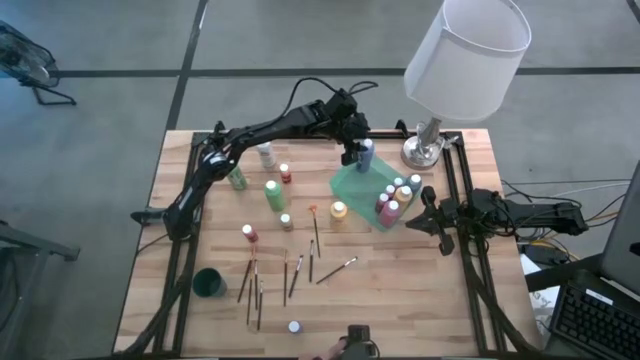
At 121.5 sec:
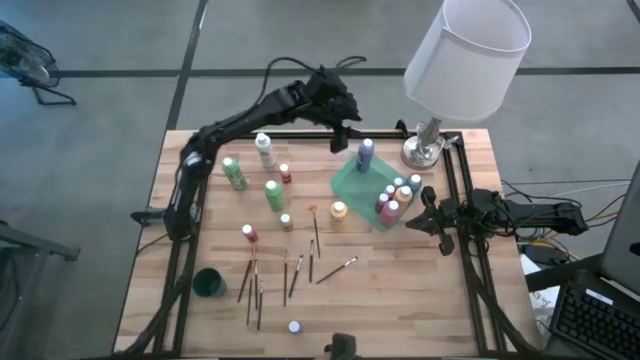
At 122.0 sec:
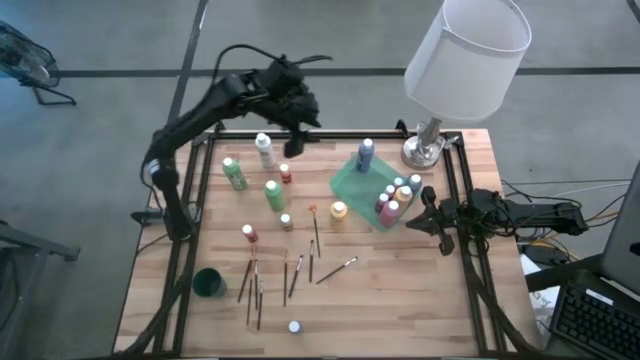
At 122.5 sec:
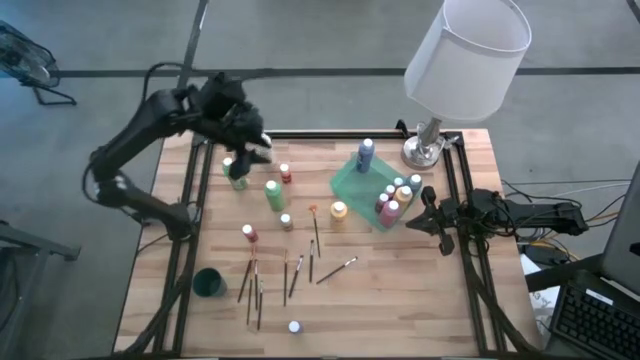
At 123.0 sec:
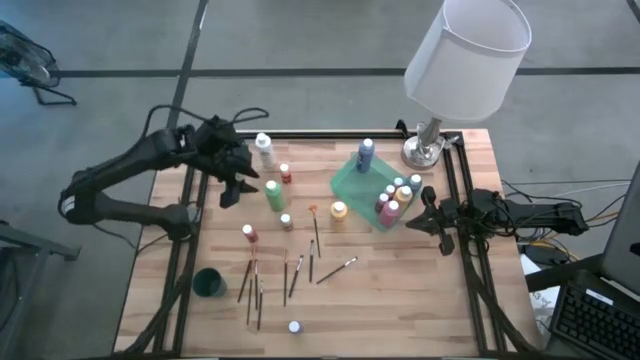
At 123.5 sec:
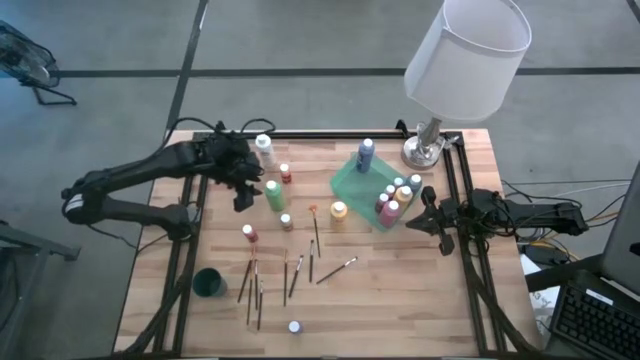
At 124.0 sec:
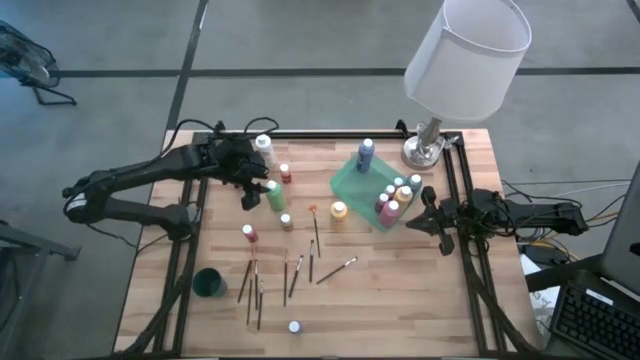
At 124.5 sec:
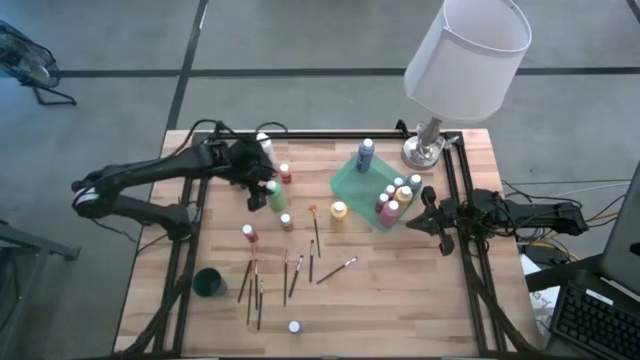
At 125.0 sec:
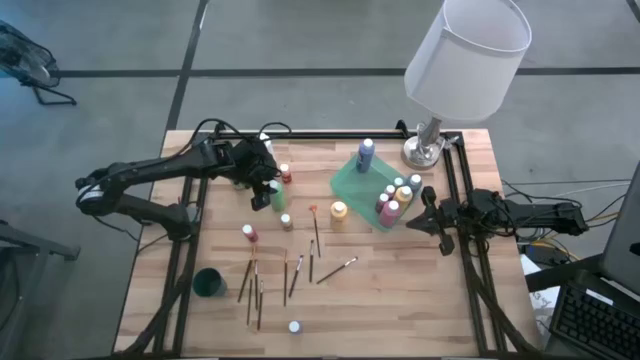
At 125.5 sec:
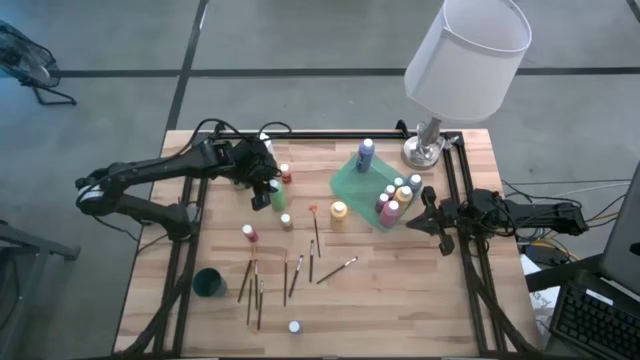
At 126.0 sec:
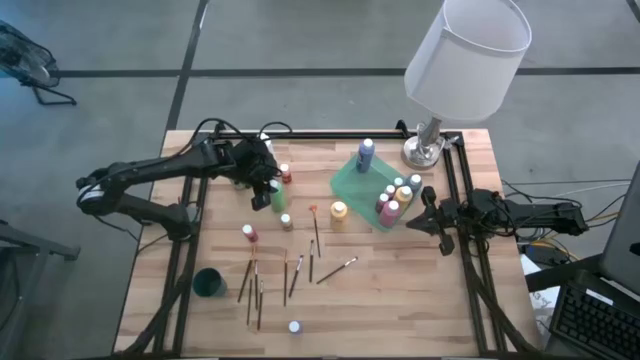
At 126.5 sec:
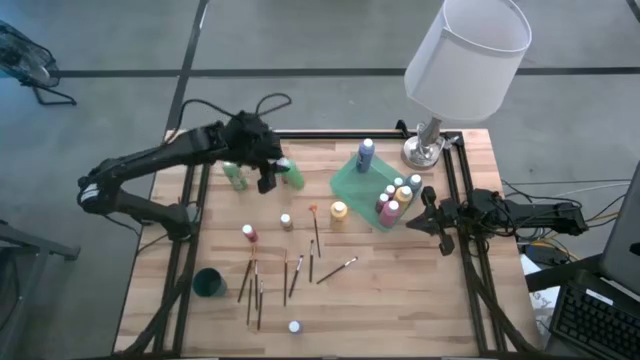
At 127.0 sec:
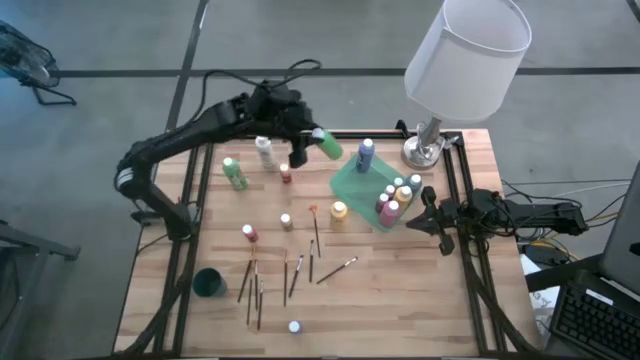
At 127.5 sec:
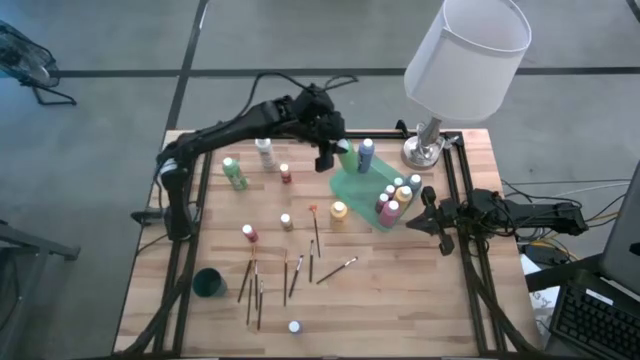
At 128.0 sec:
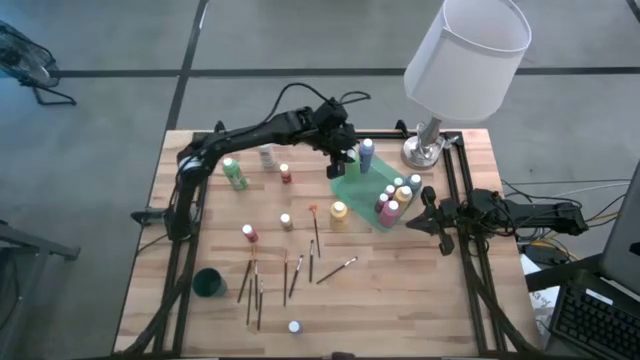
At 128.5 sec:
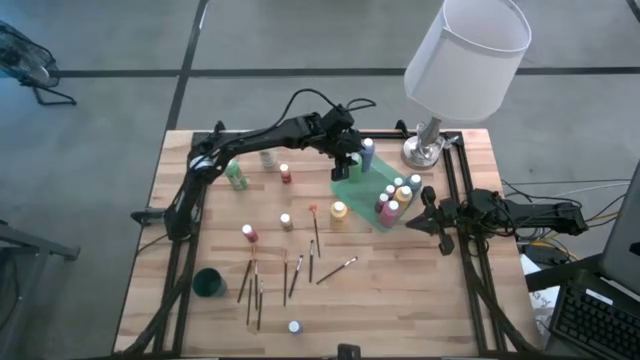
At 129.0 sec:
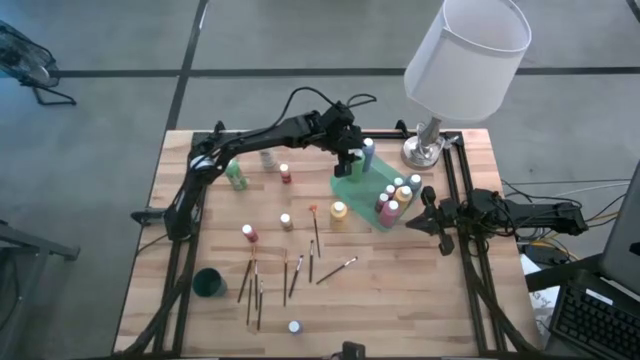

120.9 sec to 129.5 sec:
Task: Pick & Place Paint Supplies
Put the big green paint bottle into the green bin

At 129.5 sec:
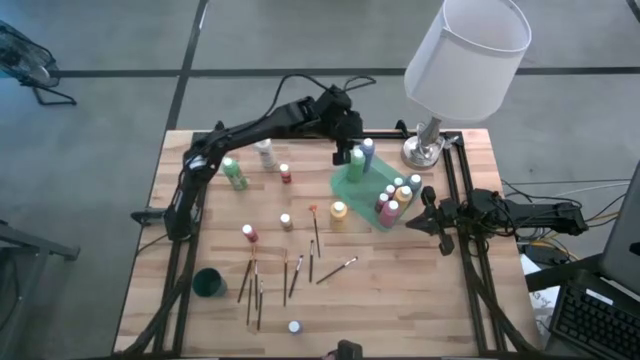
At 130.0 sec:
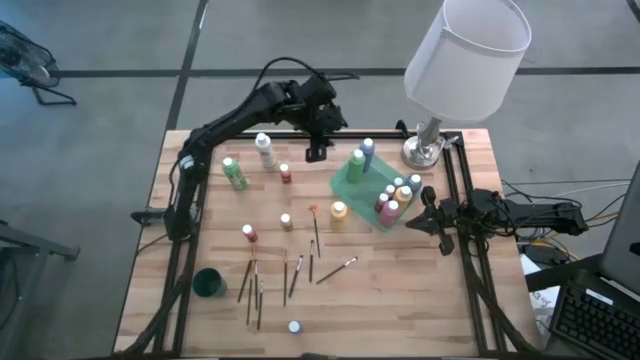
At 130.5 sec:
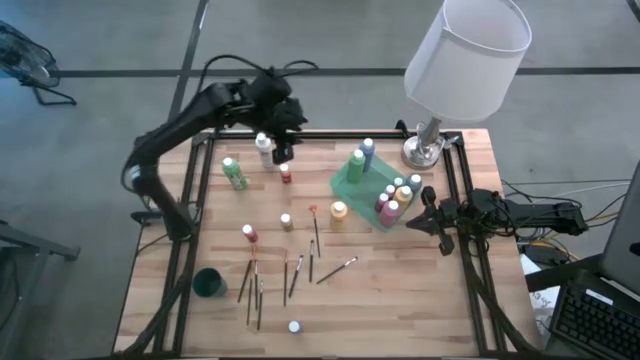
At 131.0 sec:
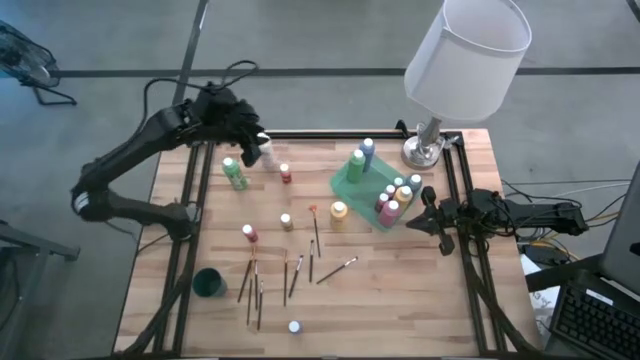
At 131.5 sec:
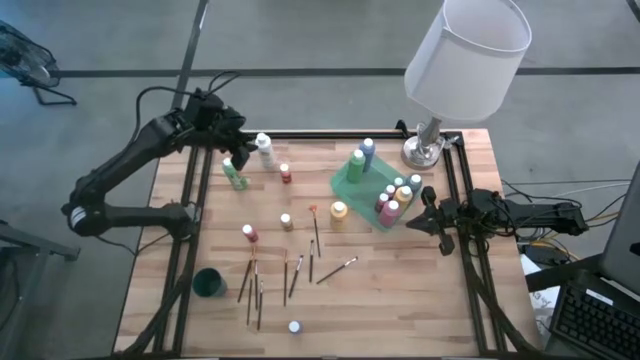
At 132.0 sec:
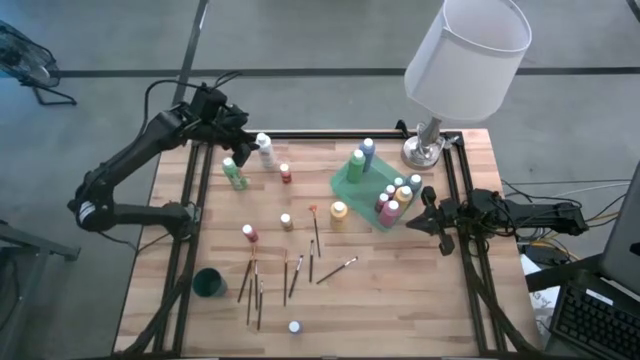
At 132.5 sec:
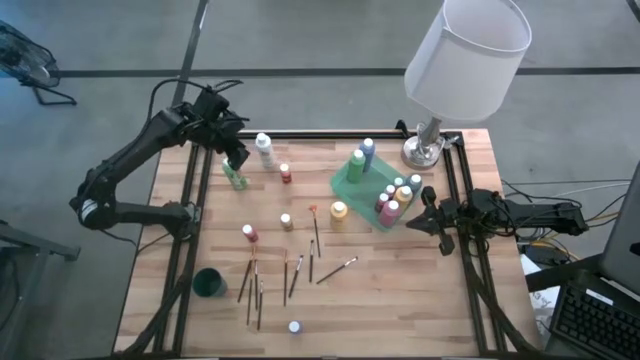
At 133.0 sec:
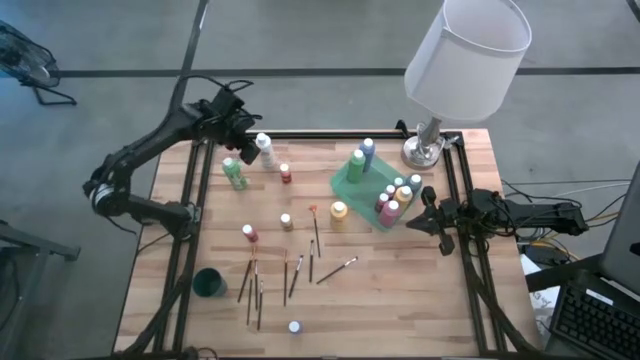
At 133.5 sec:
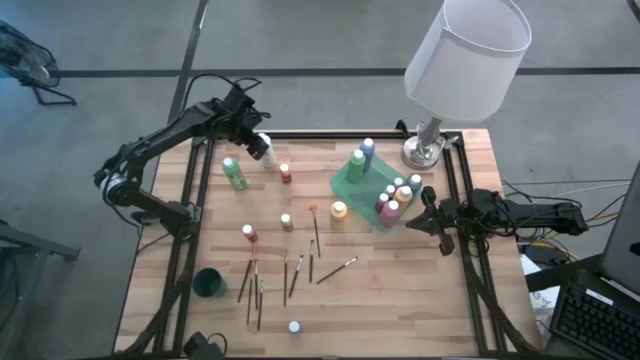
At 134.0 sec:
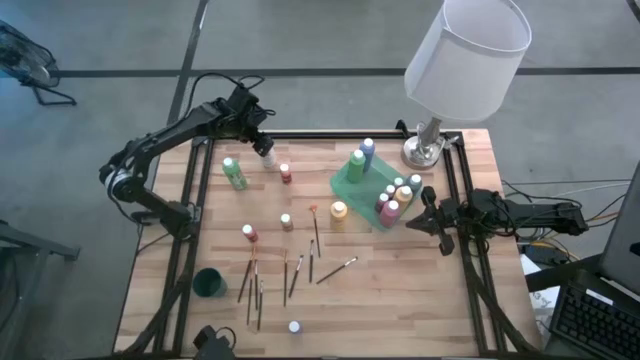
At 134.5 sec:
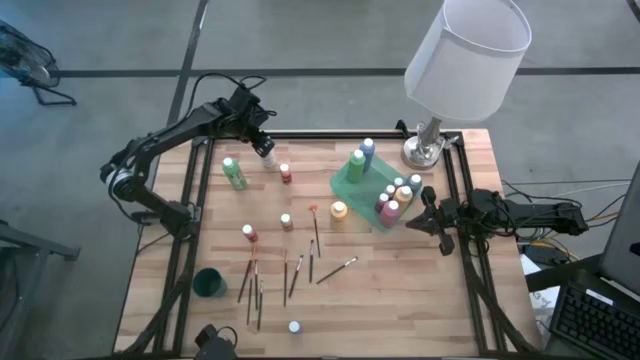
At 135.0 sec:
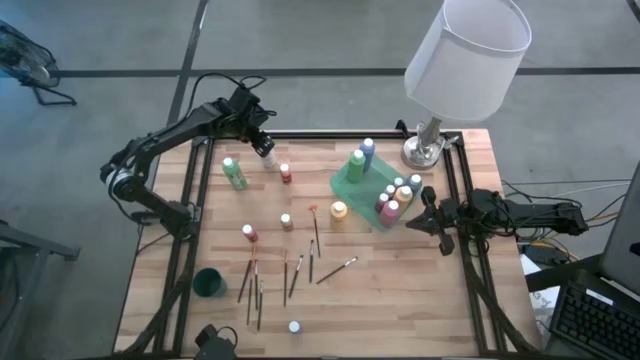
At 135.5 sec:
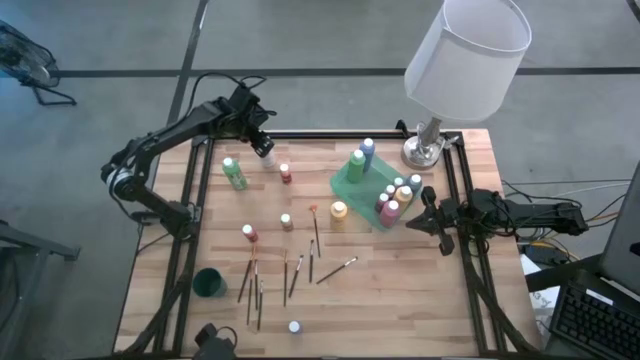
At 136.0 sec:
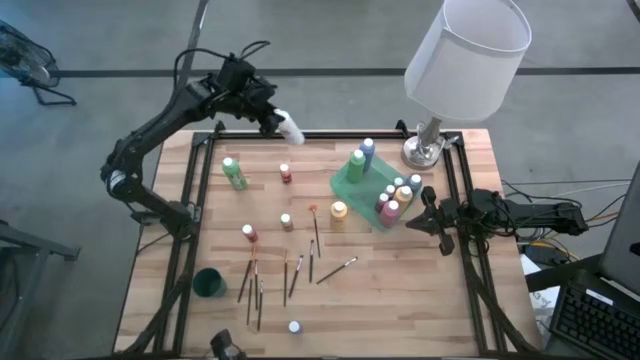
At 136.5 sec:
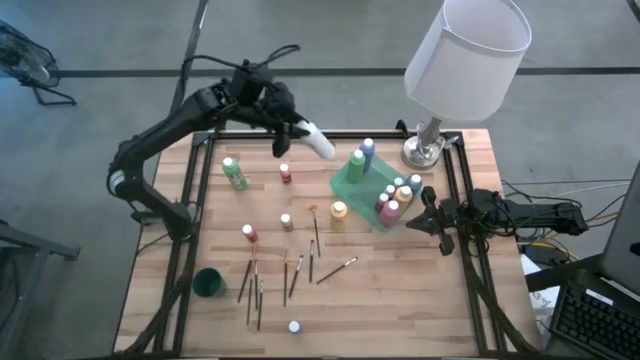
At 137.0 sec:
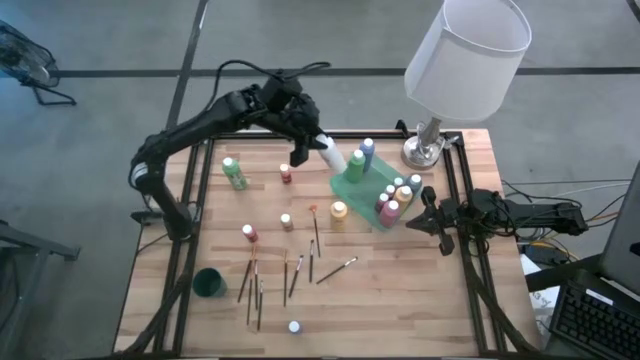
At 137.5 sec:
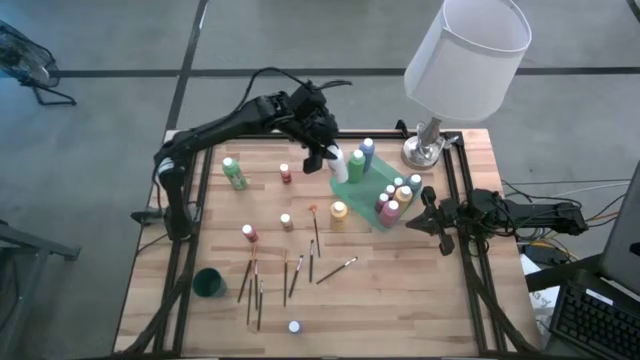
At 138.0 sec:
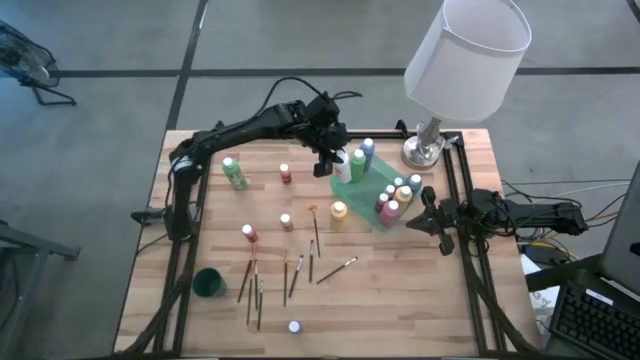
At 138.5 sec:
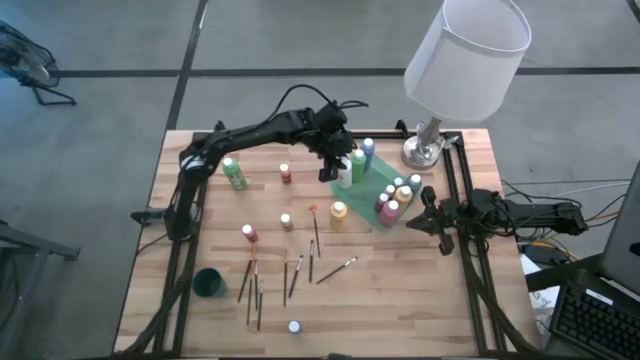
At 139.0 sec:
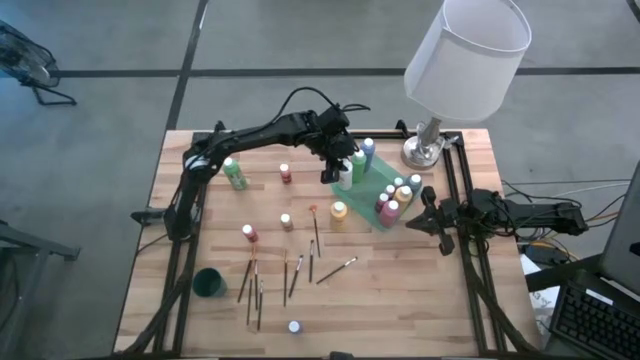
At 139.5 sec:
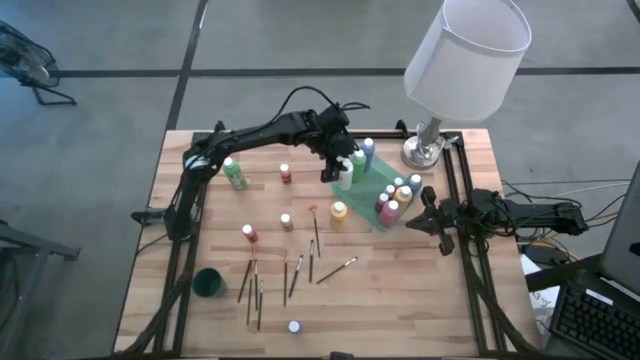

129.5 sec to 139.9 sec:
Put the big white paint bottle into the green bin

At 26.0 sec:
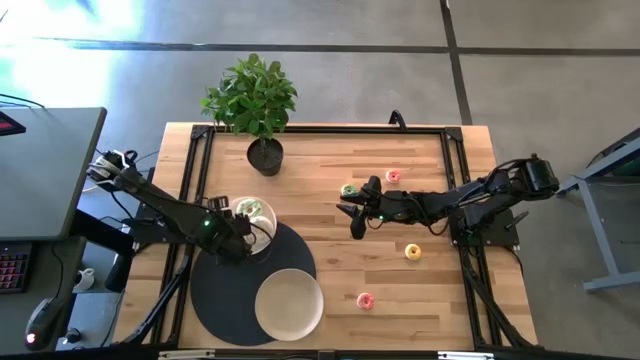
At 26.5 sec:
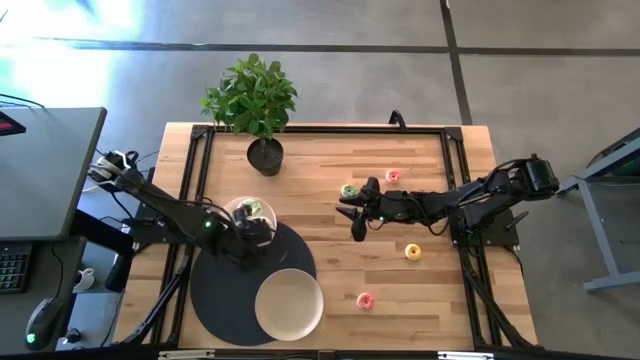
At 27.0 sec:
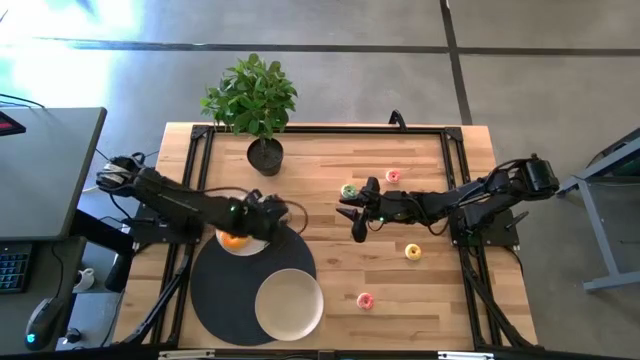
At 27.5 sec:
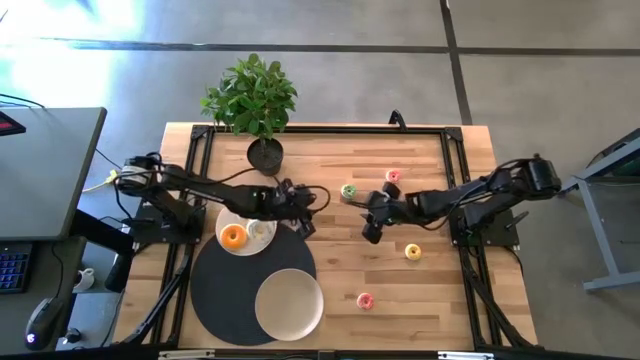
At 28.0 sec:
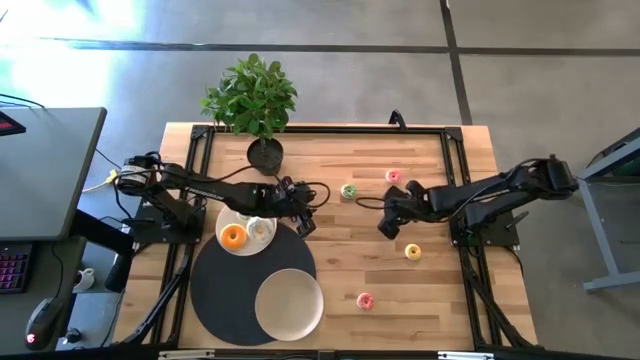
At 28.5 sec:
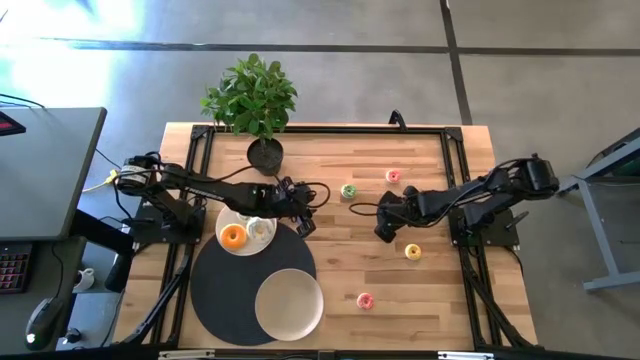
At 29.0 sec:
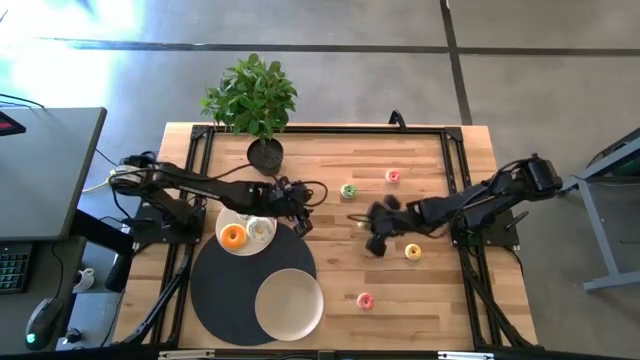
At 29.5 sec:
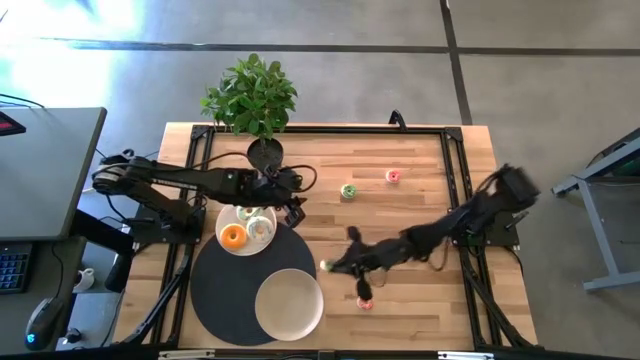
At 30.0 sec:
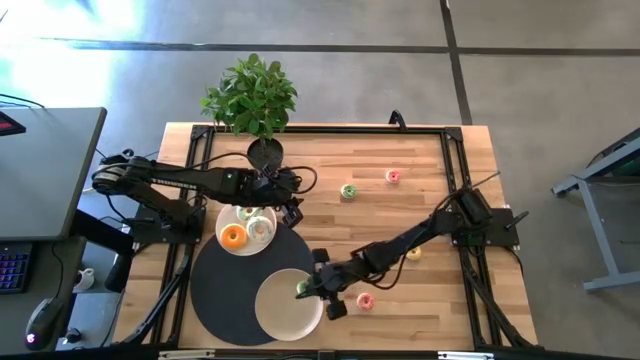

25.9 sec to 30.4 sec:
Task: Pick & Place donuts
Put the small right green donut on the light brown plate
